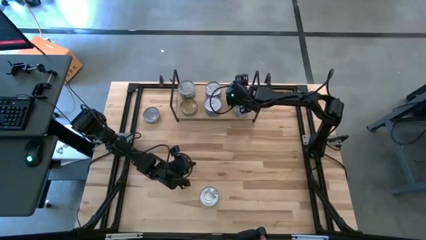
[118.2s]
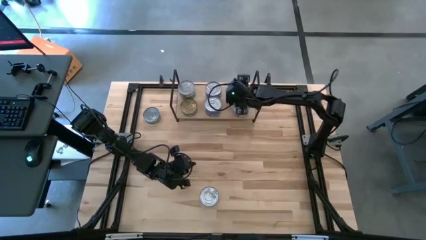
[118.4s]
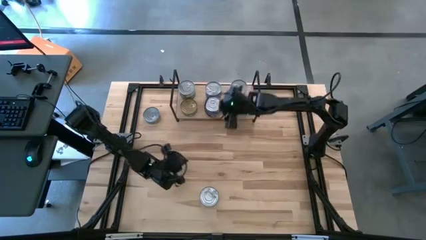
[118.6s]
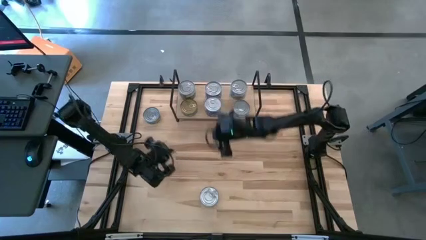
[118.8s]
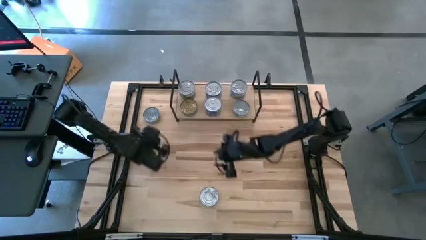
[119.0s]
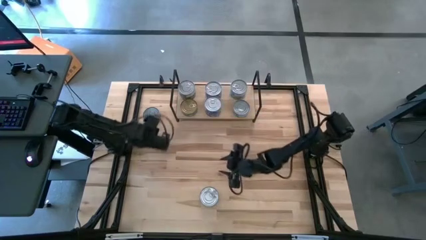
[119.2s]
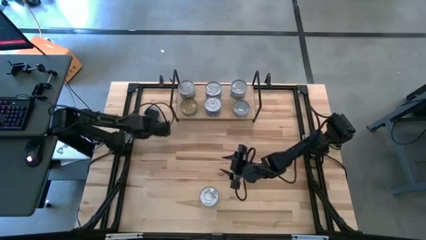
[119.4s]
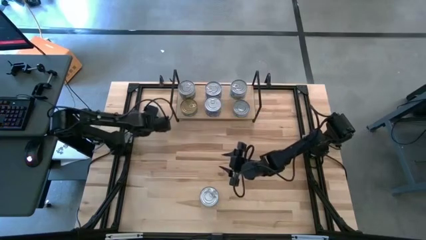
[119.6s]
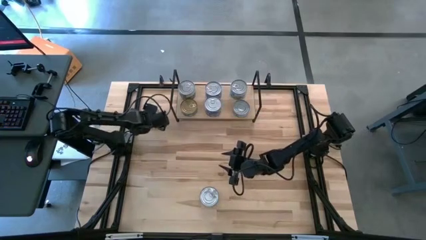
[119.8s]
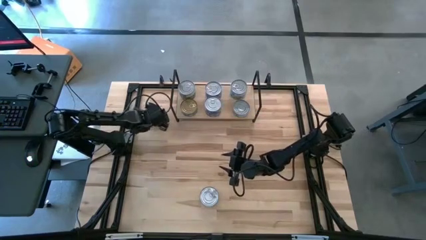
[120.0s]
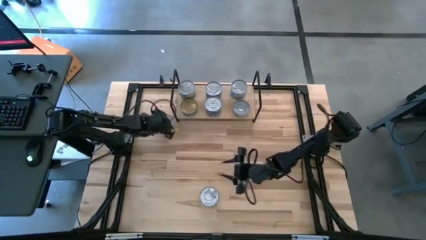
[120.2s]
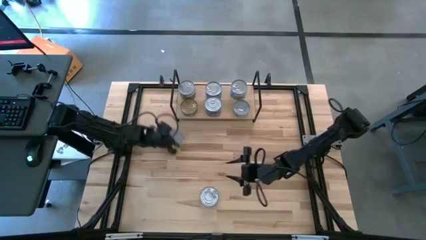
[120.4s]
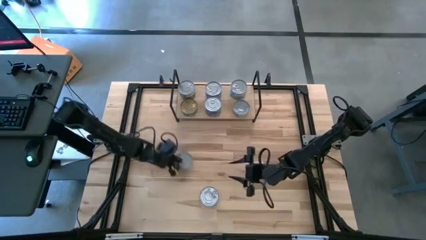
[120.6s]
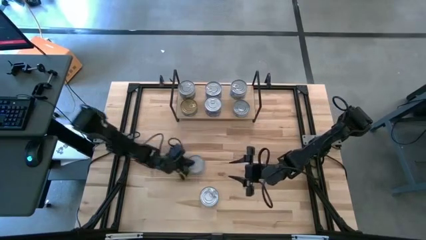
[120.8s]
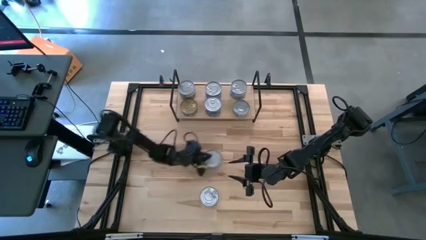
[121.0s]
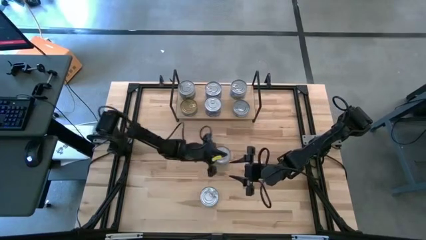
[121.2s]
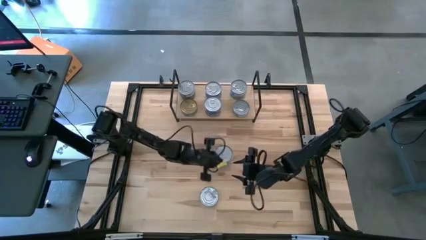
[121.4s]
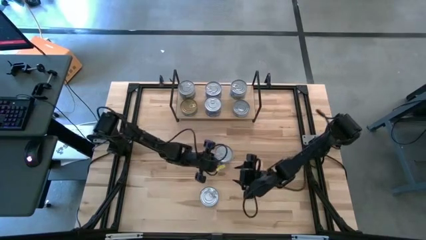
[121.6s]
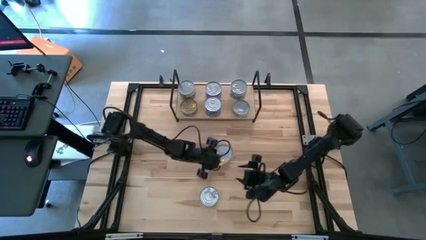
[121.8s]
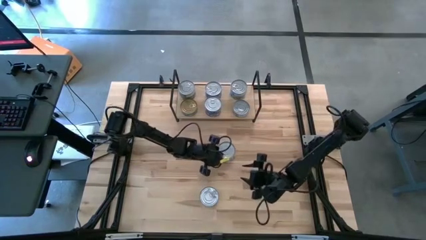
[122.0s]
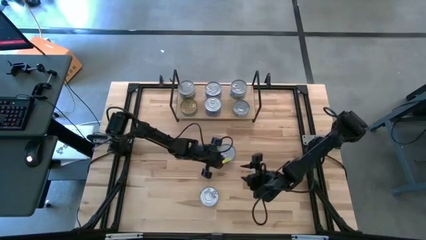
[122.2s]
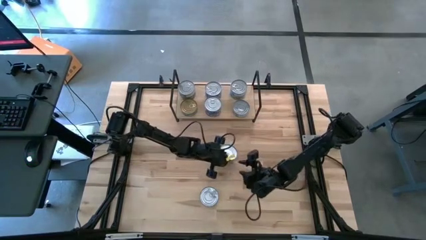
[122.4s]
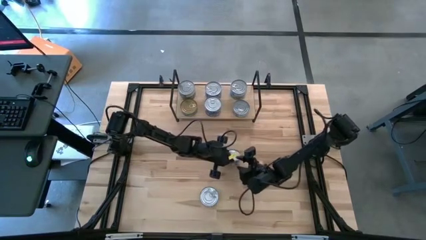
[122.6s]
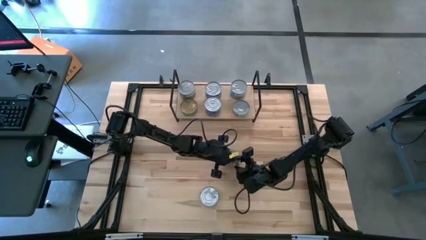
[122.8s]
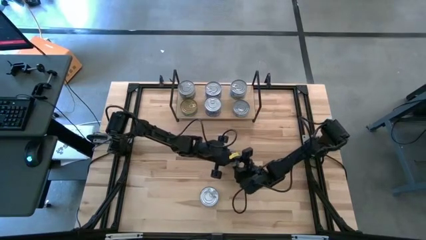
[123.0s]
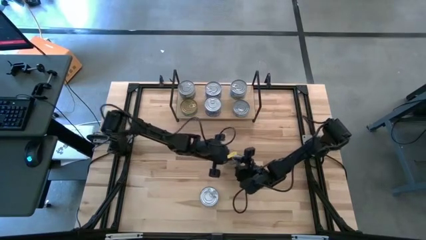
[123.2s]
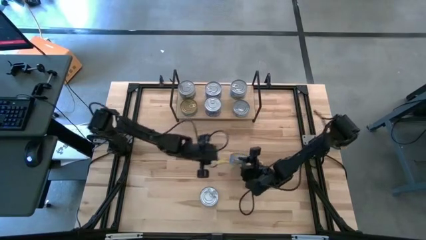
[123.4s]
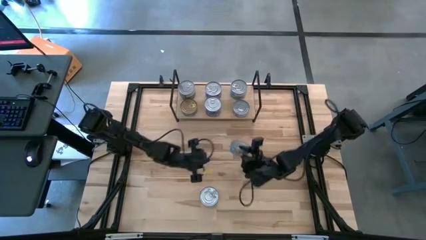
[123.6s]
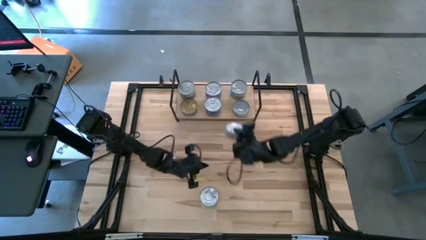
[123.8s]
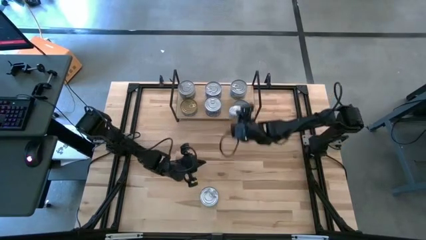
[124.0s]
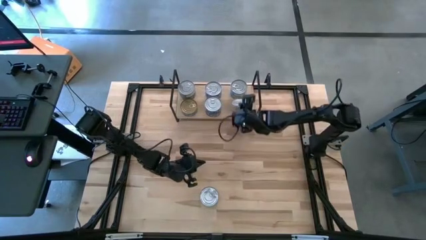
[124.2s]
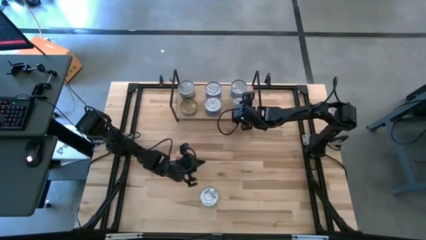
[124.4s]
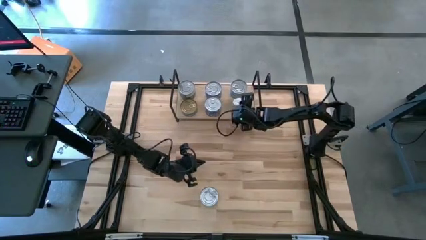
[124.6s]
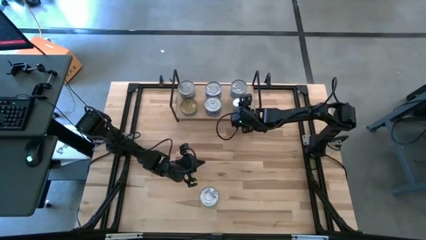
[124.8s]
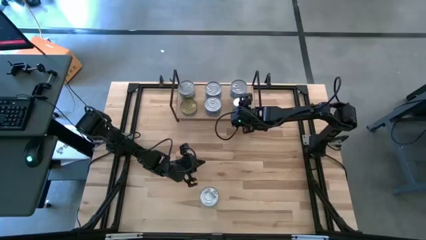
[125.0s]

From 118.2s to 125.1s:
Task: Stack canned seafood by type on shelf
Stack the yellow blue tuna can on top of the yellow blue tuna can on the shelf

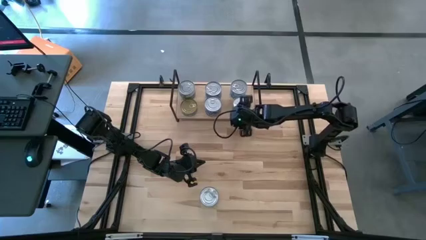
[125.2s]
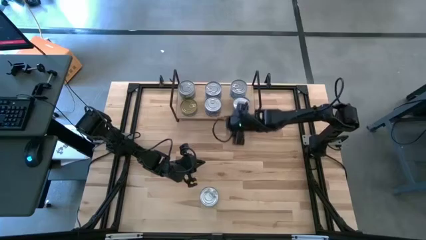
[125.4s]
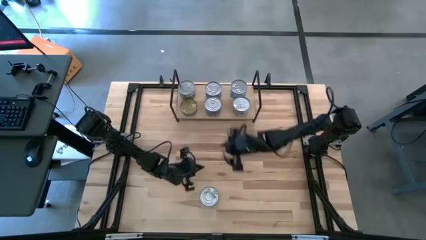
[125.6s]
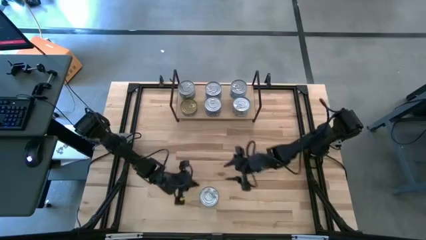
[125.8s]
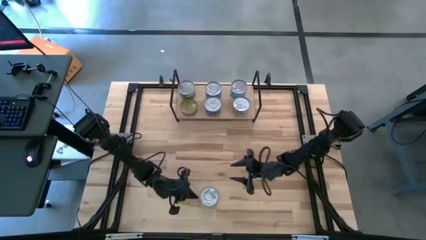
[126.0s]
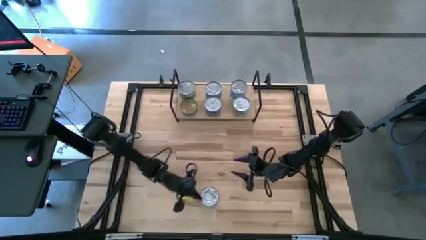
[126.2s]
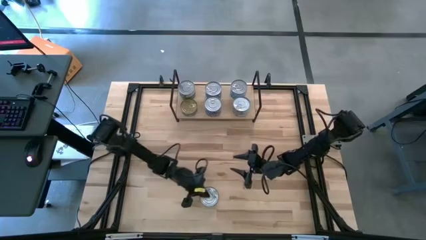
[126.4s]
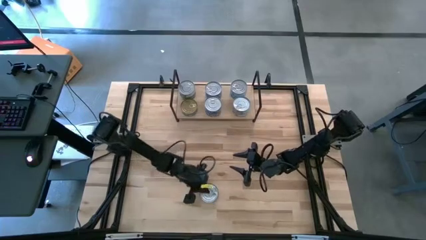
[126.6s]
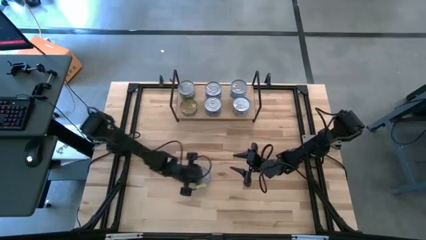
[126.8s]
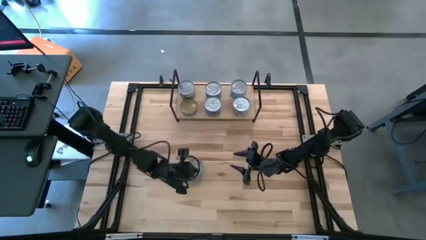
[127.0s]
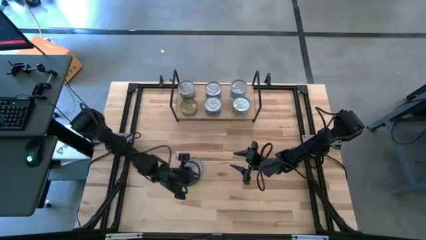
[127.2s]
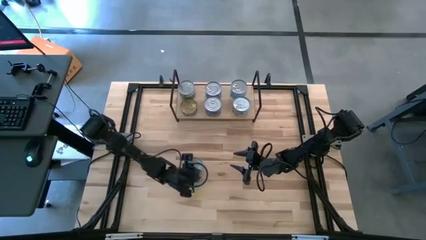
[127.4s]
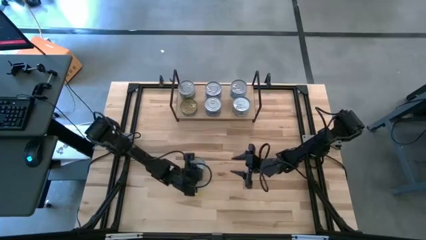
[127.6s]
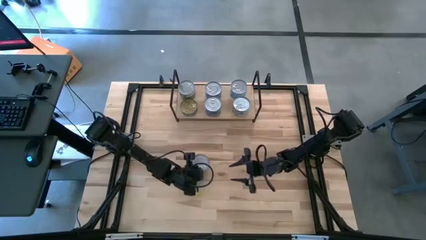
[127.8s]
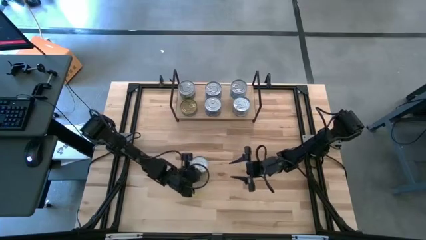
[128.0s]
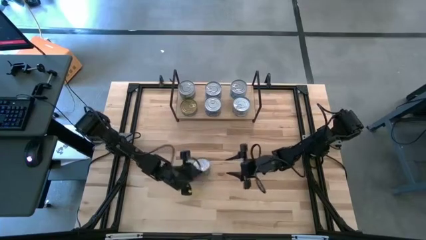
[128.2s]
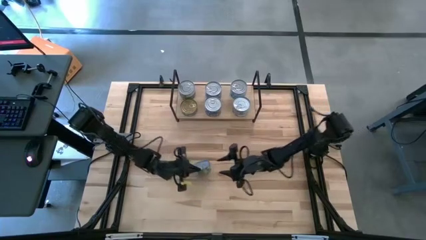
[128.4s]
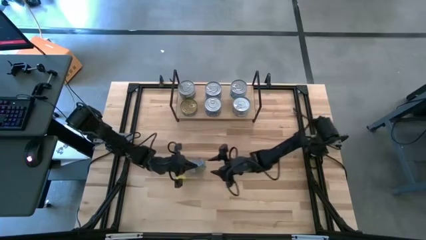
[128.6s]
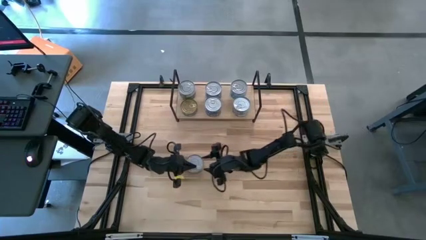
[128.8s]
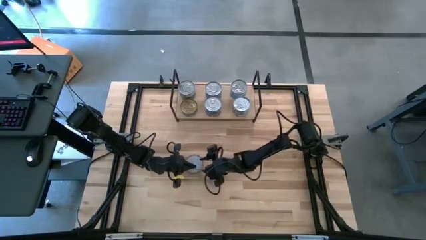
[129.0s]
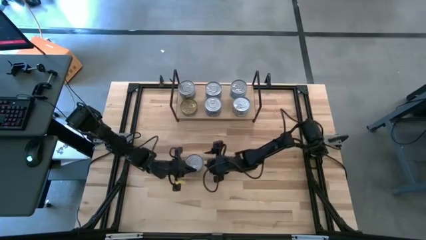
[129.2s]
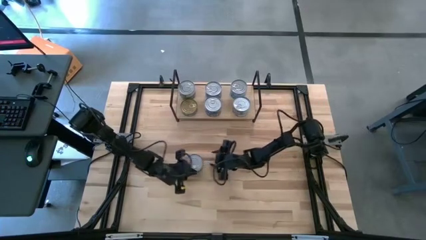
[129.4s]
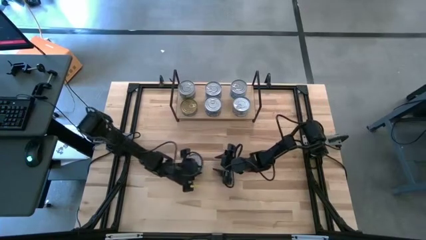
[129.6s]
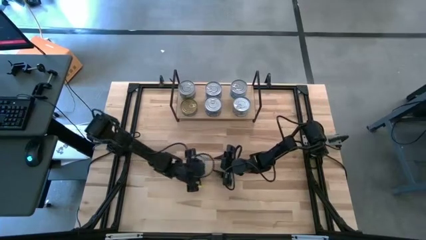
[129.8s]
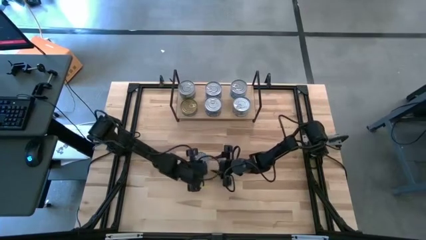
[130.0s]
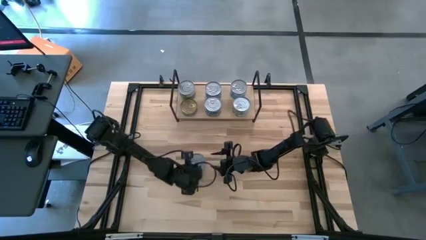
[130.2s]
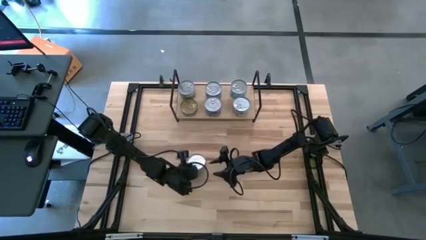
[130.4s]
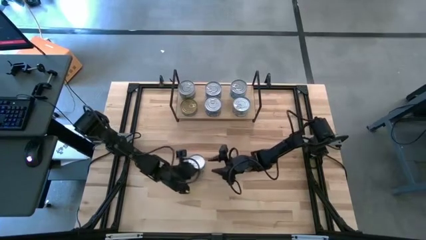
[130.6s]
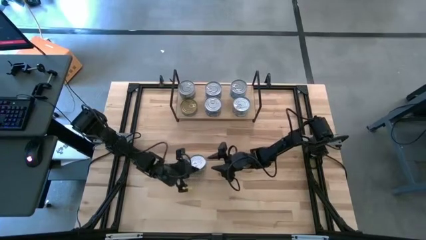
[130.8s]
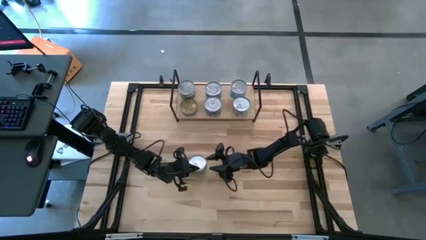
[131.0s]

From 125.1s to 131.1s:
Stack the green tuna can on the shelf

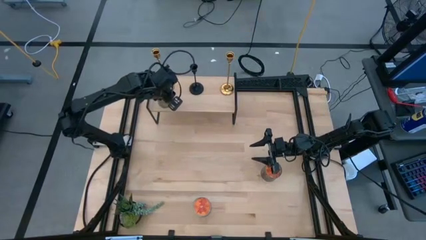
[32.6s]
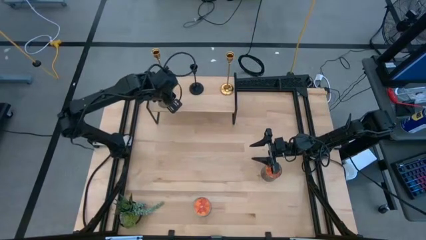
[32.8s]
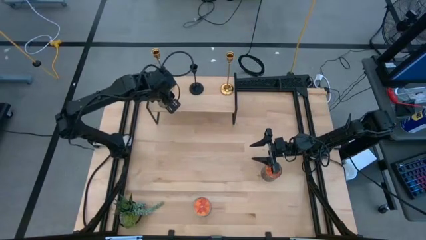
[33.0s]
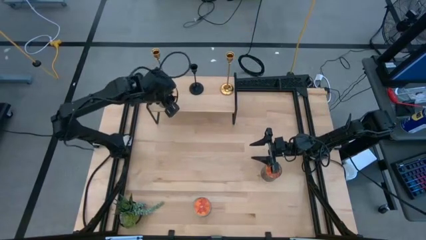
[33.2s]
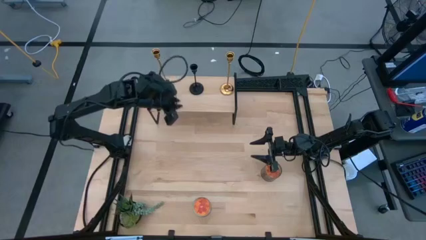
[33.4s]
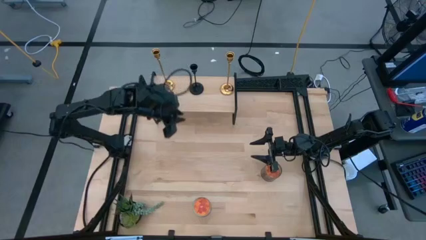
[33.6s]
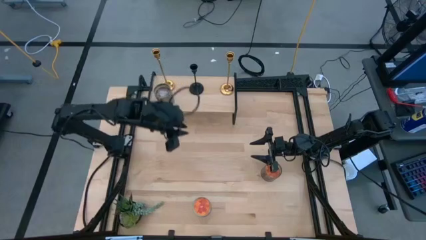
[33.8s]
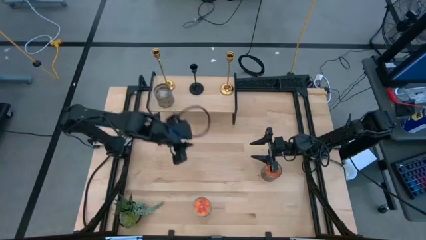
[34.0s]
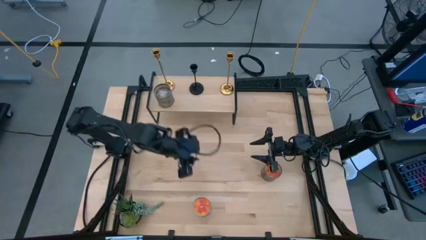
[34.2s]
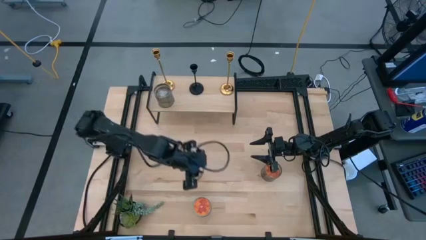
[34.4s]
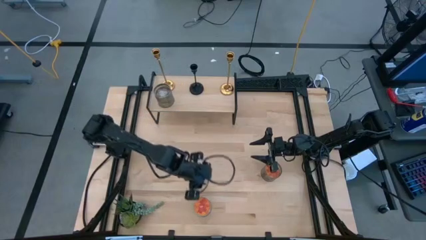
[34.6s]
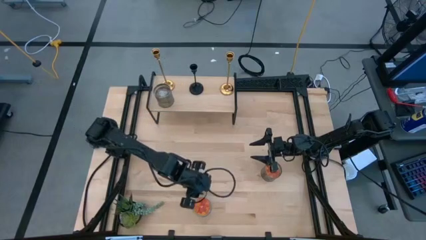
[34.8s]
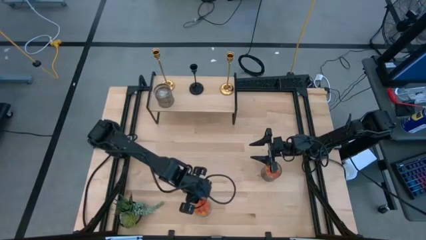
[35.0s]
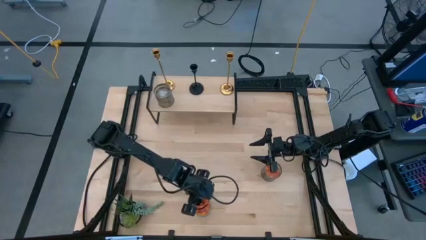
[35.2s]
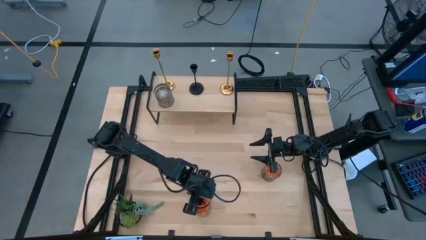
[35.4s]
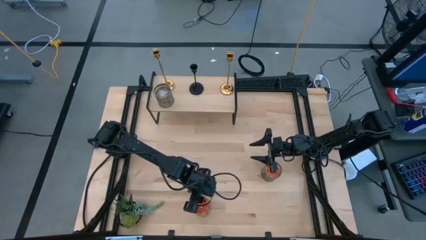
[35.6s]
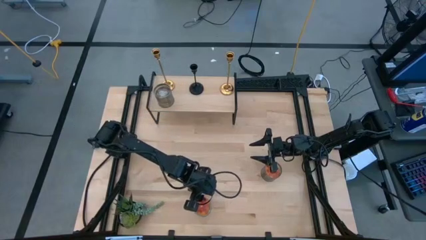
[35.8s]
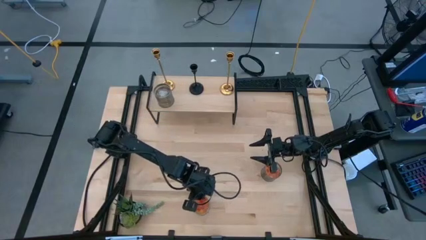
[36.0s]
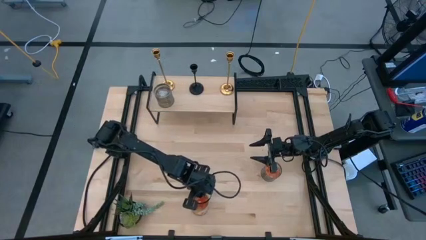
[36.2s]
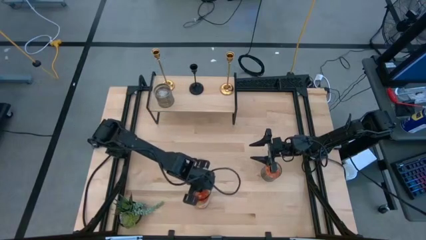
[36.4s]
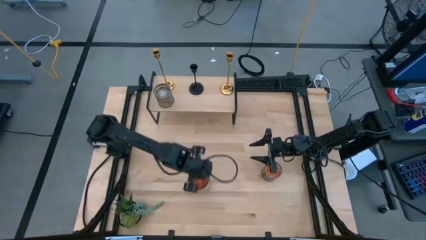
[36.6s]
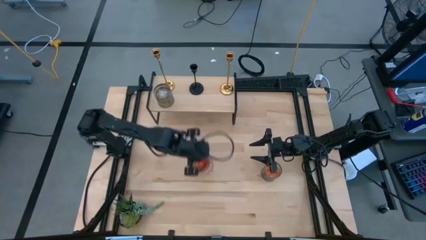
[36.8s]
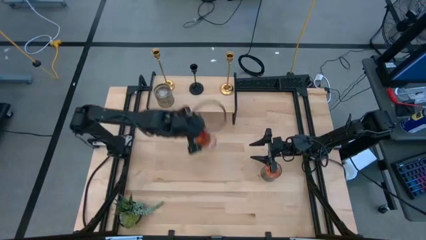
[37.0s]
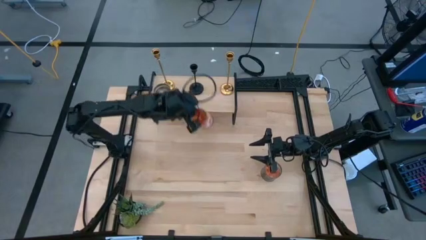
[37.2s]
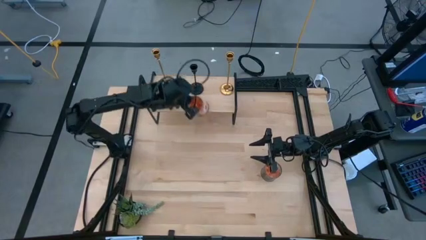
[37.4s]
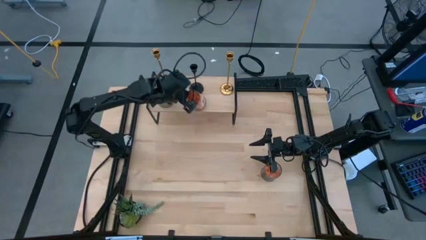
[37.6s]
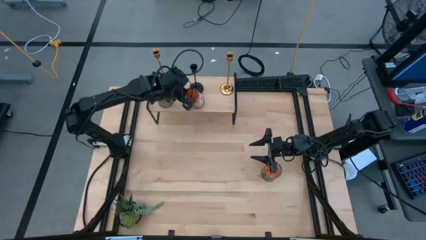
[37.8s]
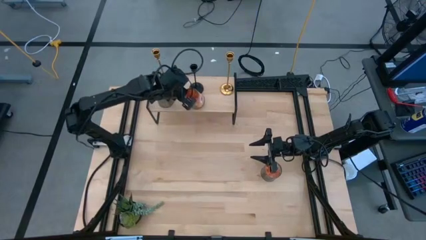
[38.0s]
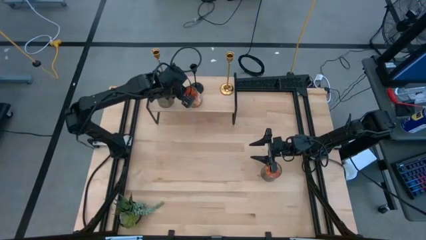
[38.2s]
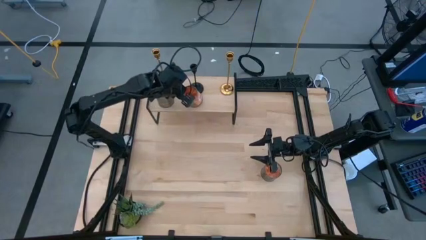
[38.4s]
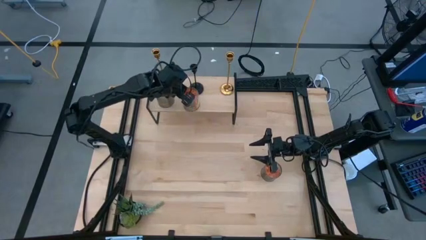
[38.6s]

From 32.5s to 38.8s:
Task: Pick & Place candle stick holders
Put the left orange scented candle on the shelf
